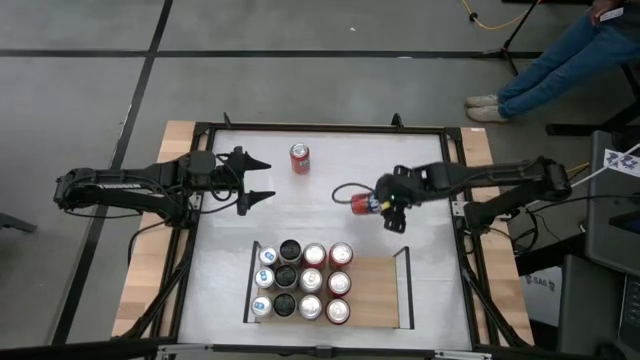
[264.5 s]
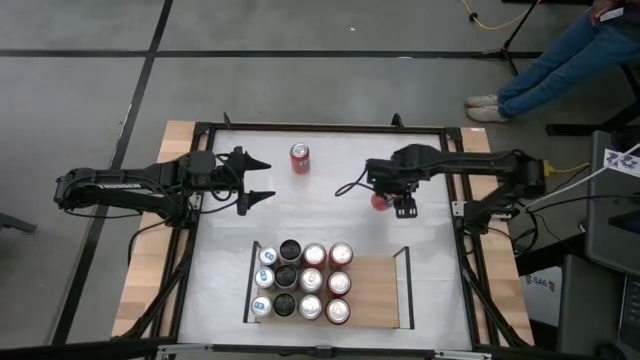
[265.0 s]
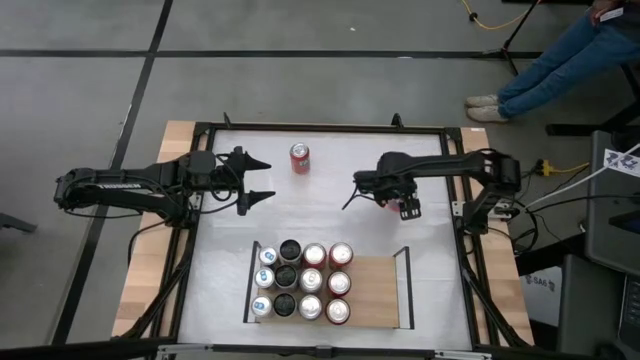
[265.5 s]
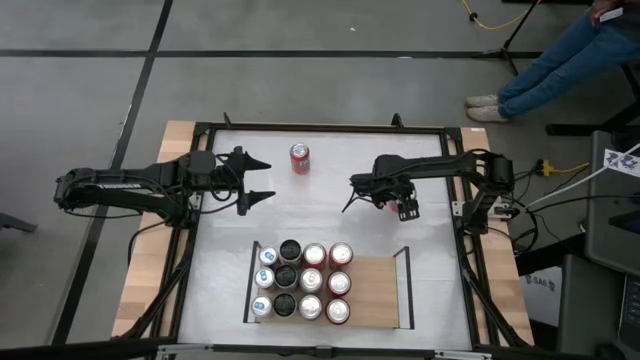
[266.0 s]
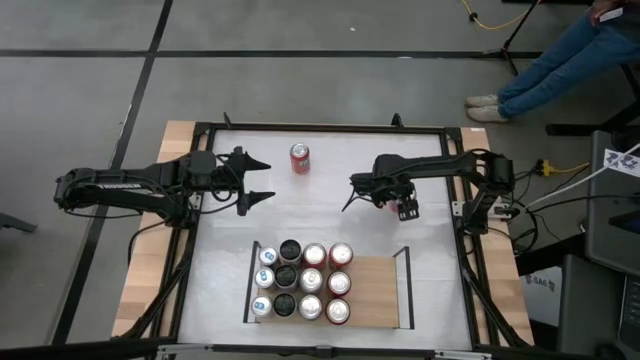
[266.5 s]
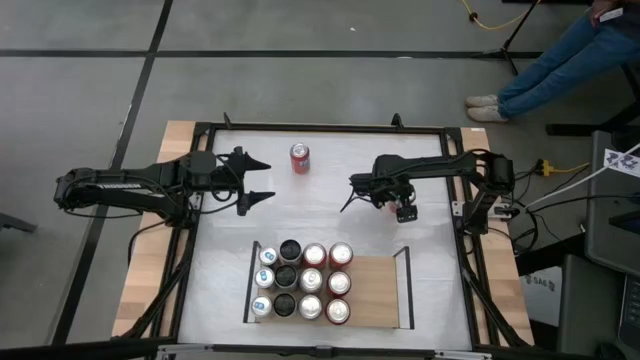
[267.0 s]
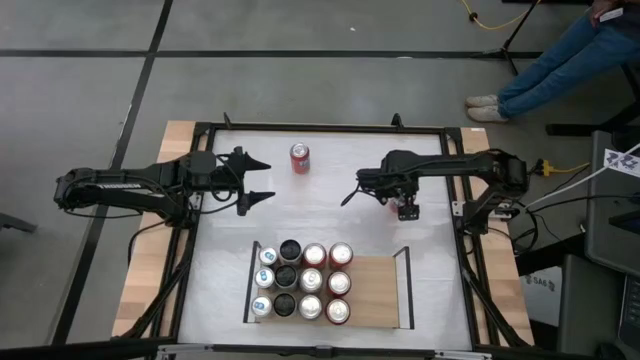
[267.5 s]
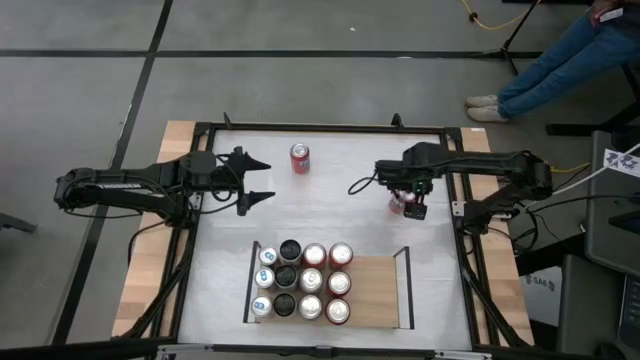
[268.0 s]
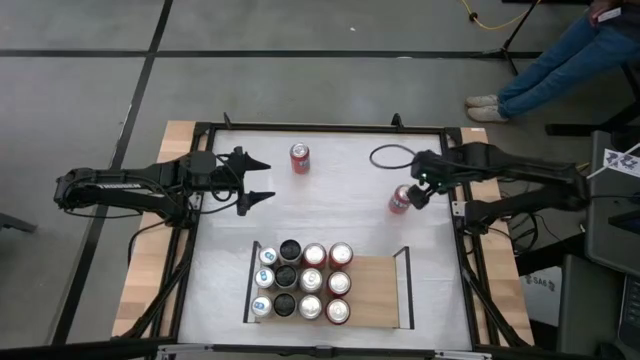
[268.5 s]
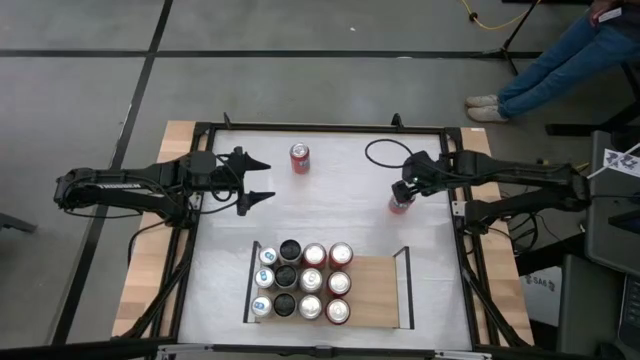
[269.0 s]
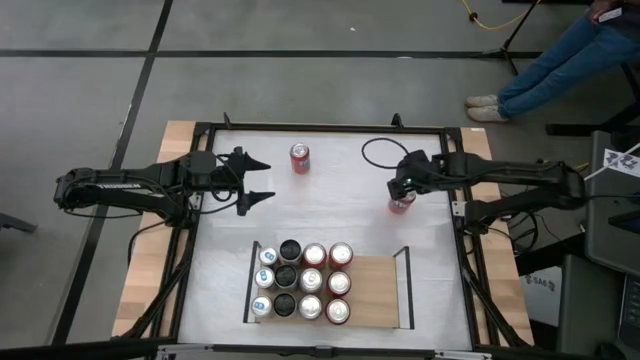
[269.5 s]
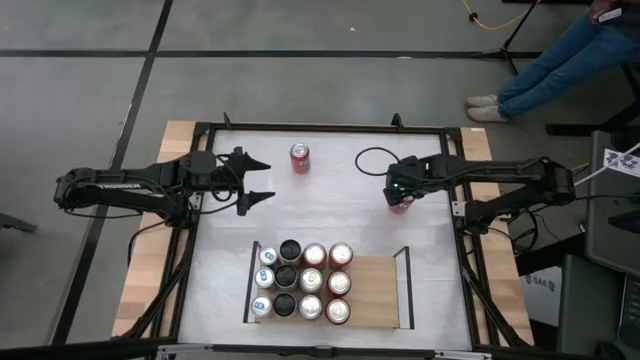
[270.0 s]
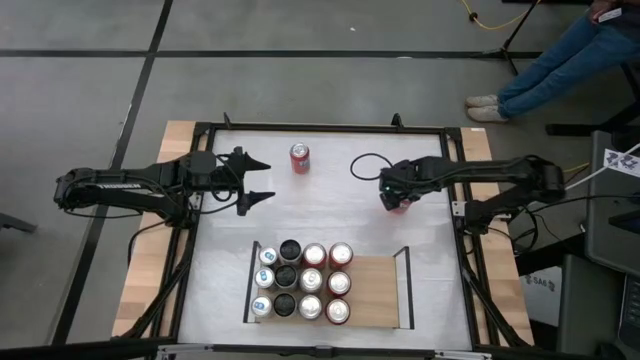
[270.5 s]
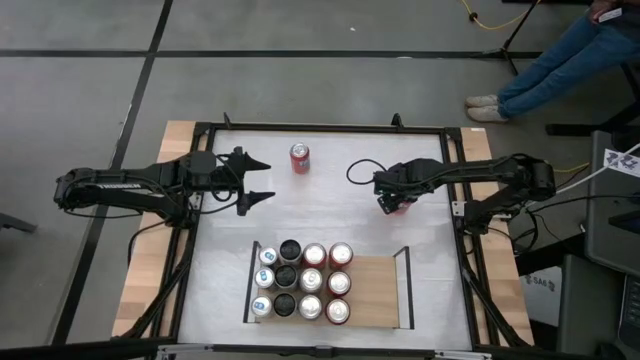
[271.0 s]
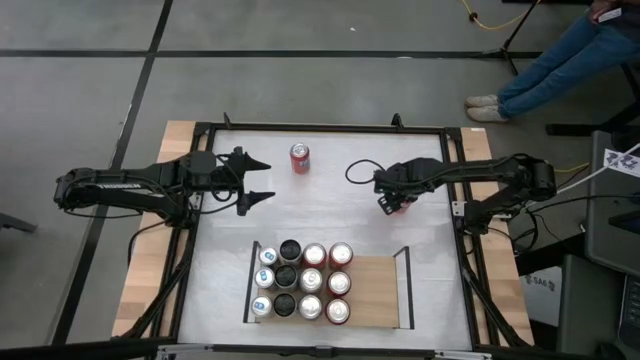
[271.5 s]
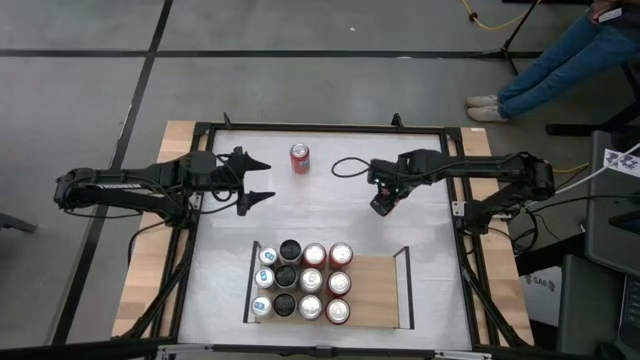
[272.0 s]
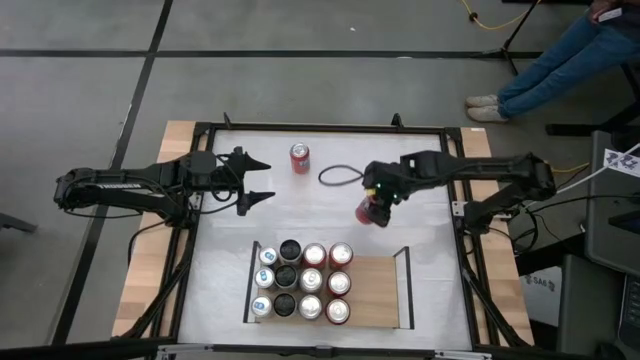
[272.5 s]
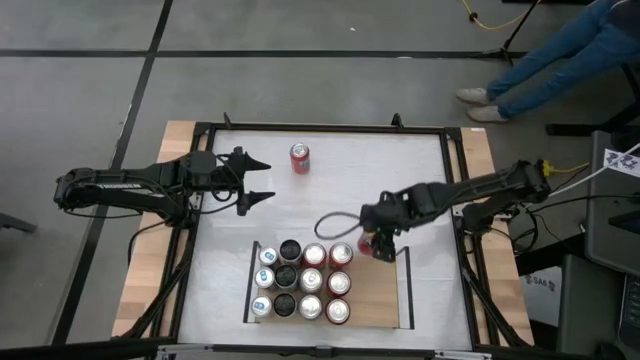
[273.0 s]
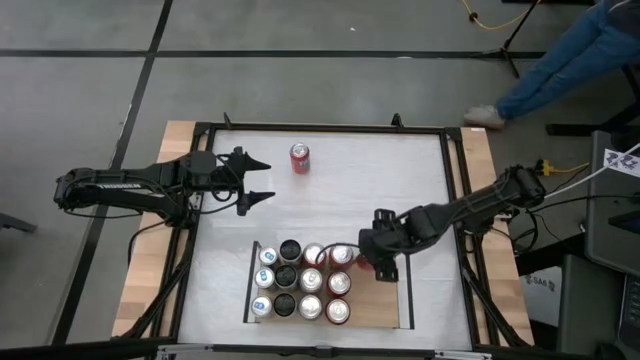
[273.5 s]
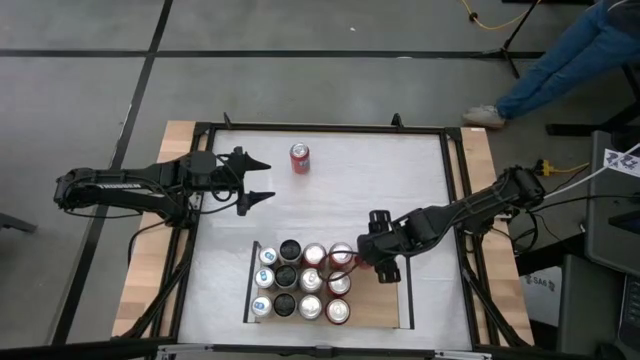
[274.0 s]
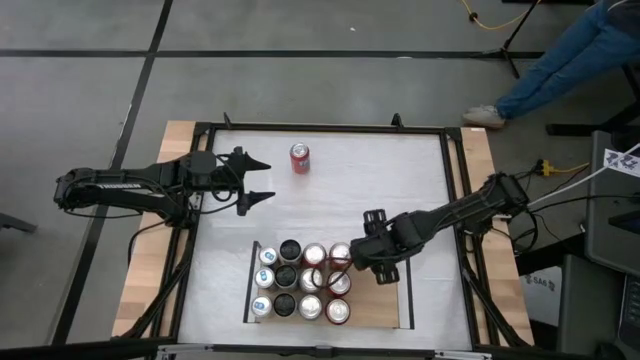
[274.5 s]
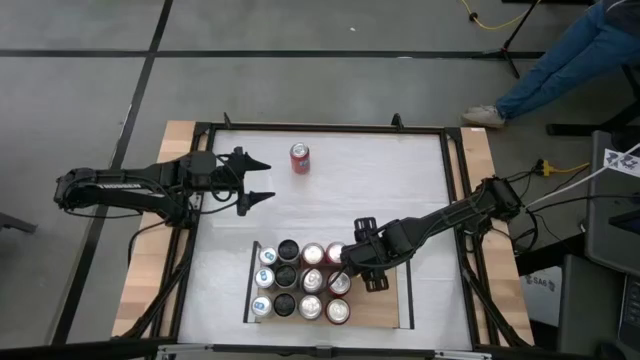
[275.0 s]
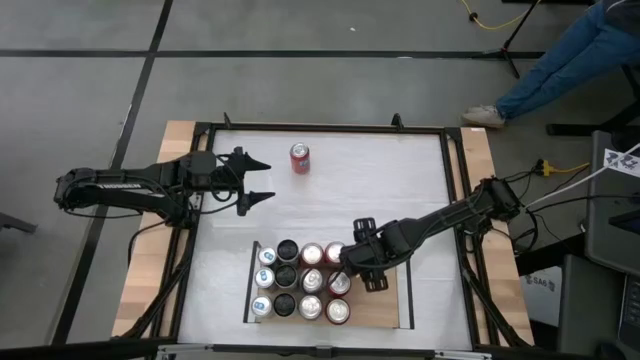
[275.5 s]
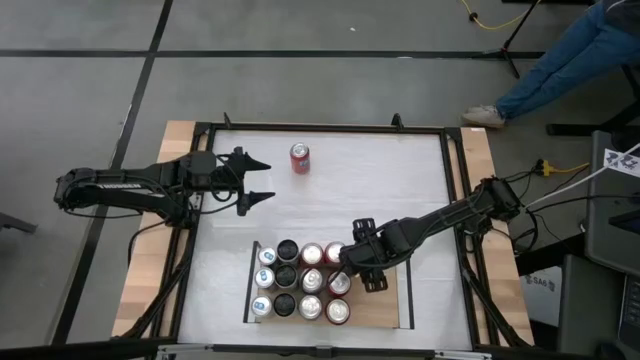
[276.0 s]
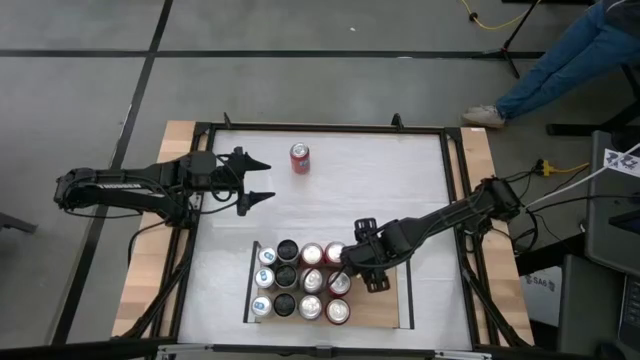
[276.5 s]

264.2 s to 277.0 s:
Task: Place canned beverage on shelf
Put the red soda can on the shelf

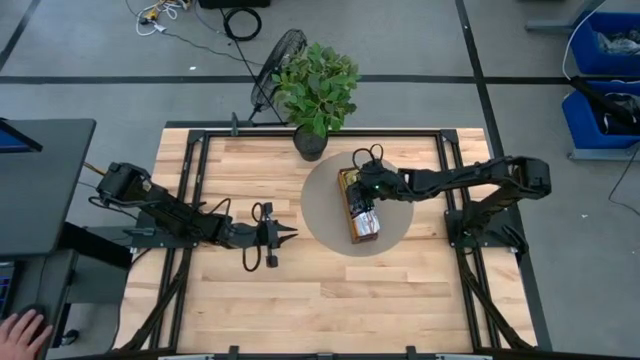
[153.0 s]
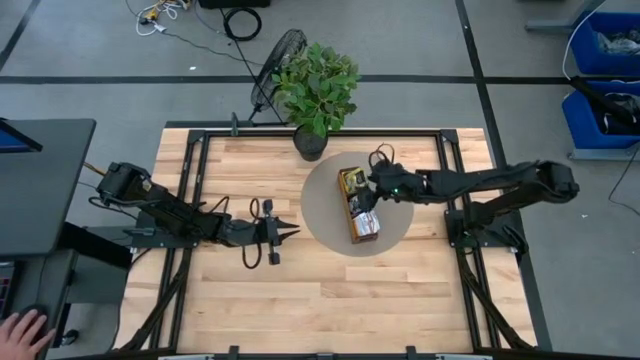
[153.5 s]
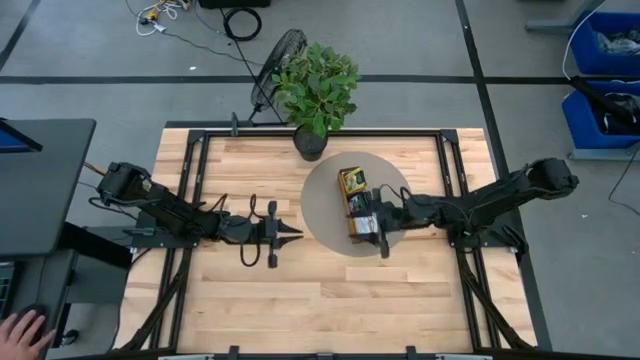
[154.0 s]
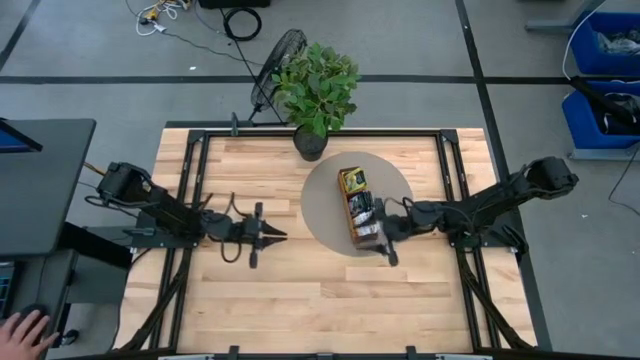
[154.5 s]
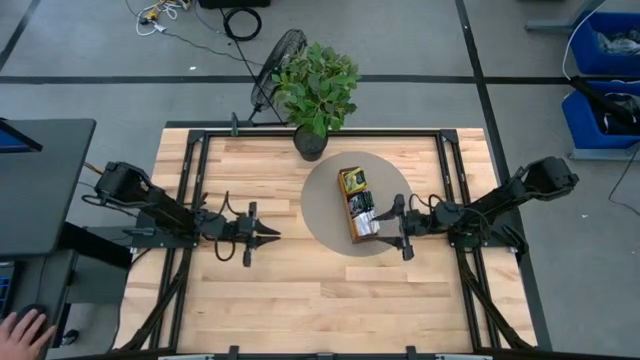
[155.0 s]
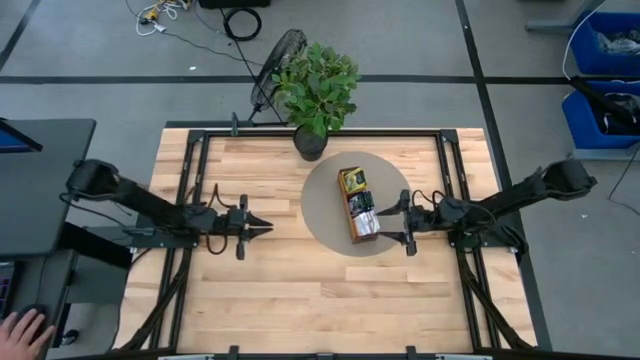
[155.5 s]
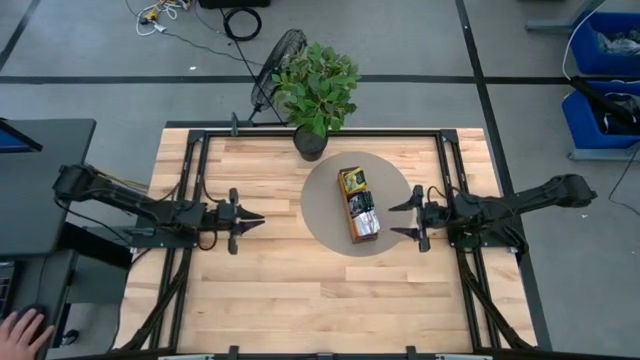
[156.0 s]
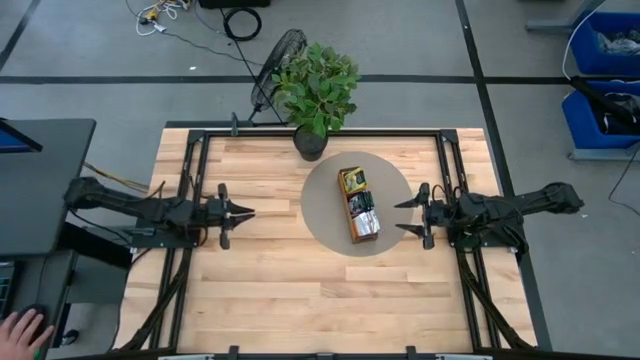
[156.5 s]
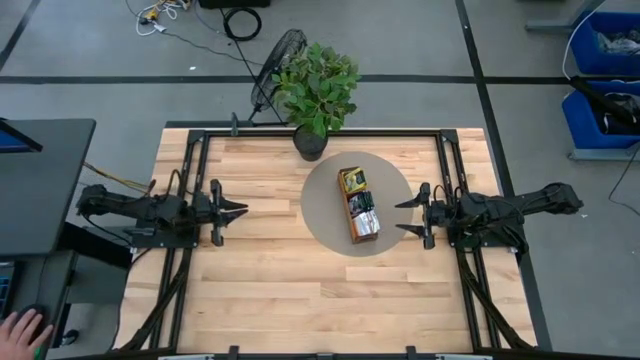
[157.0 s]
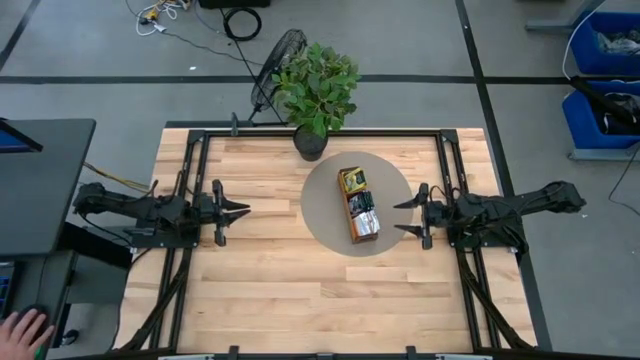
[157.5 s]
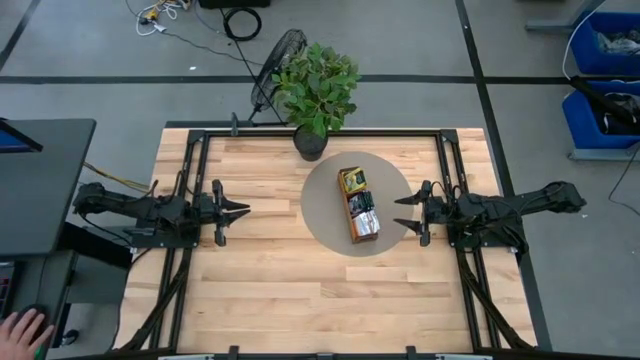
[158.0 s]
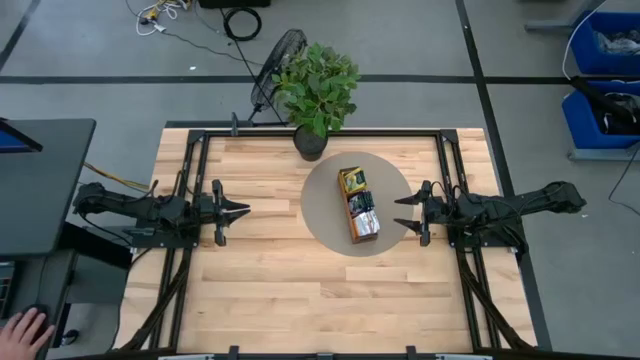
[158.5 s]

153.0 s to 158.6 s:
Task: Pick & Place Tea
Return to Home Position
